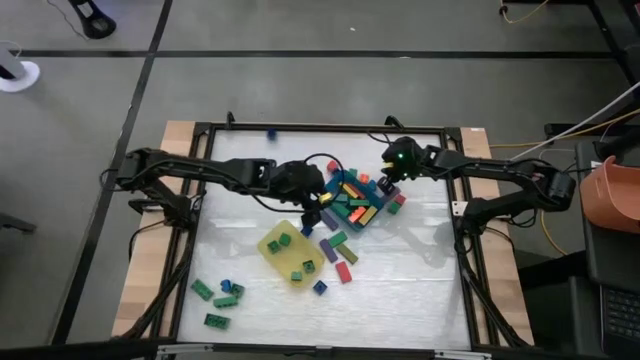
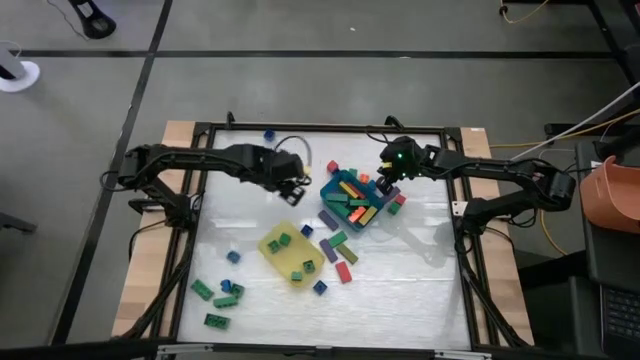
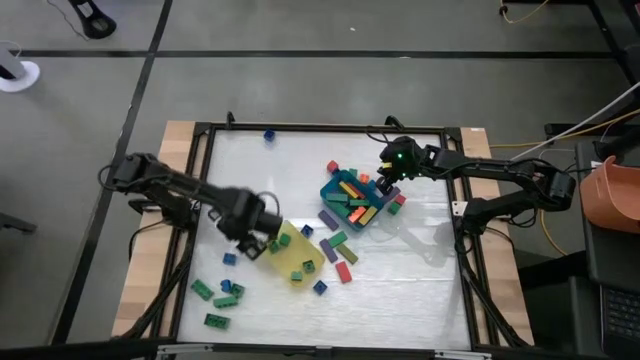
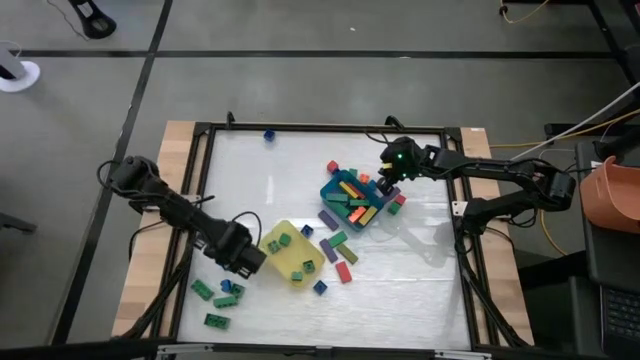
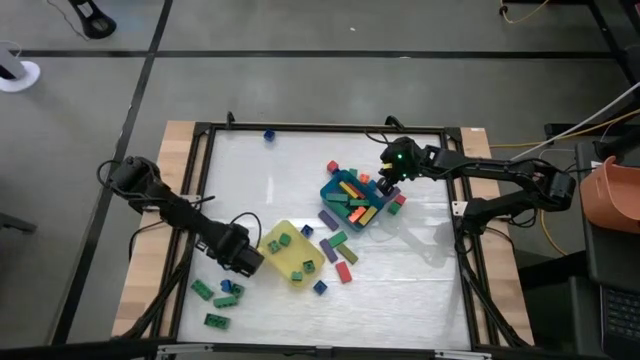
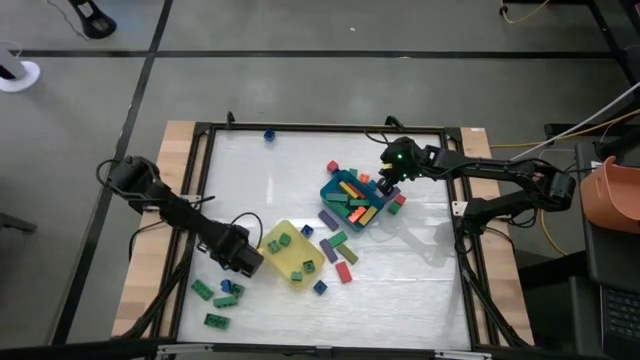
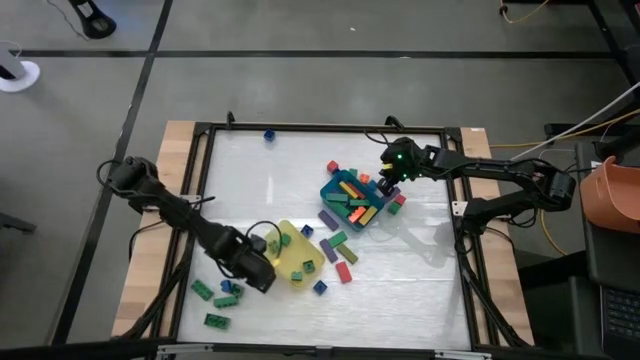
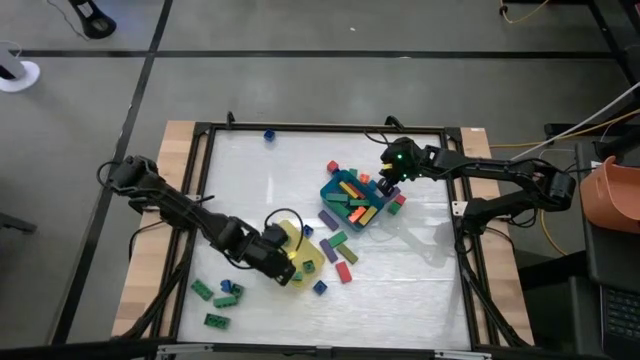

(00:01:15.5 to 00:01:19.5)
Task: Sort blocks by size
Put the small blue game piece into the yellow bin

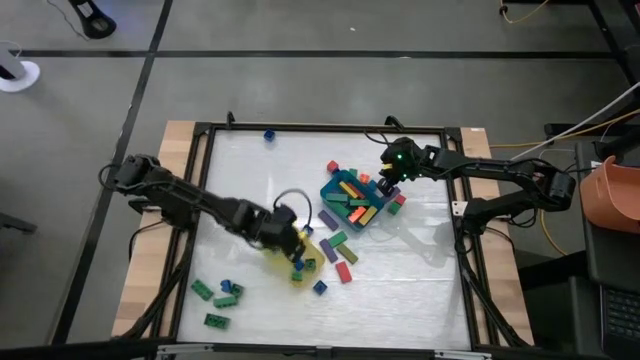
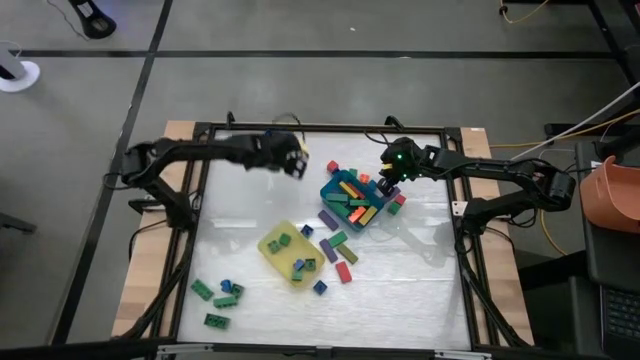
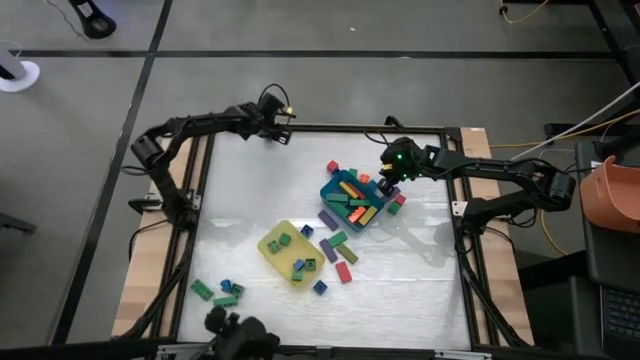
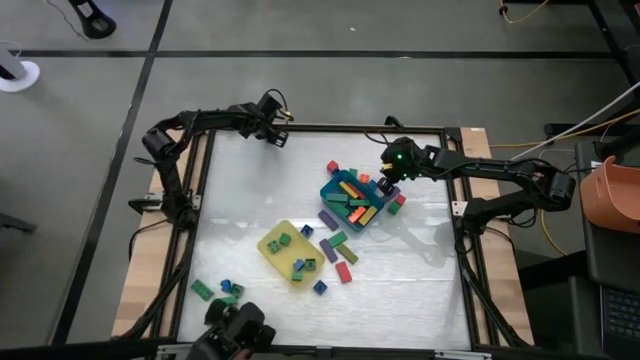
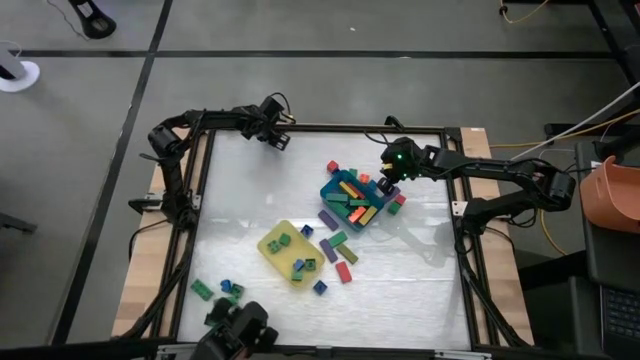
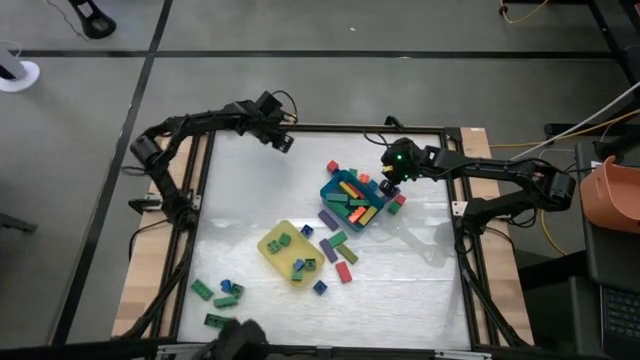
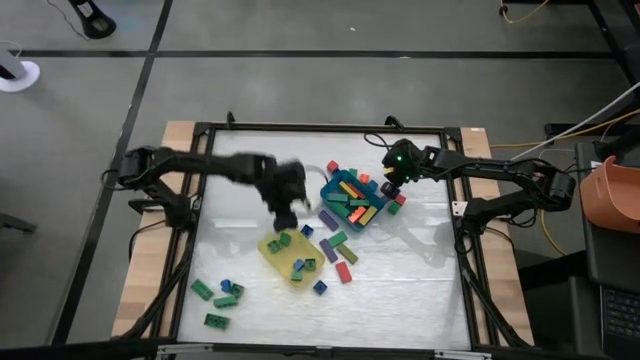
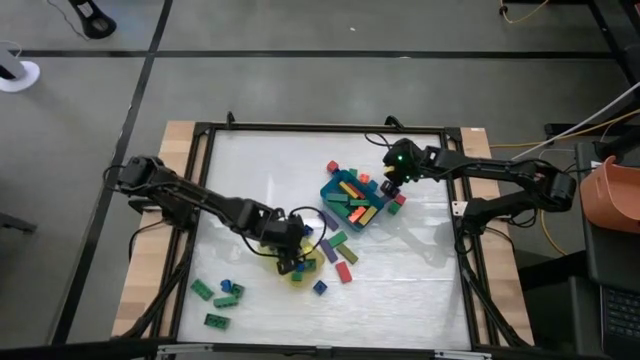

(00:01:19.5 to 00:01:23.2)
Put the small blue game piece into the yellow bin

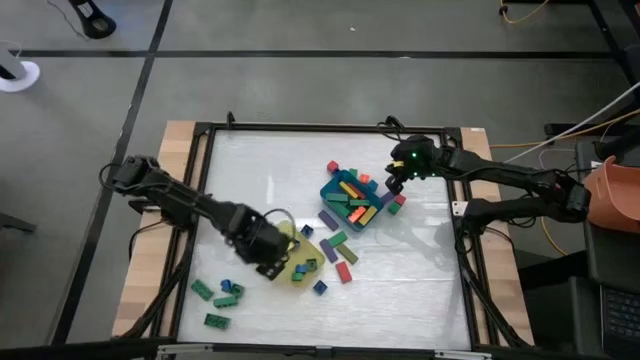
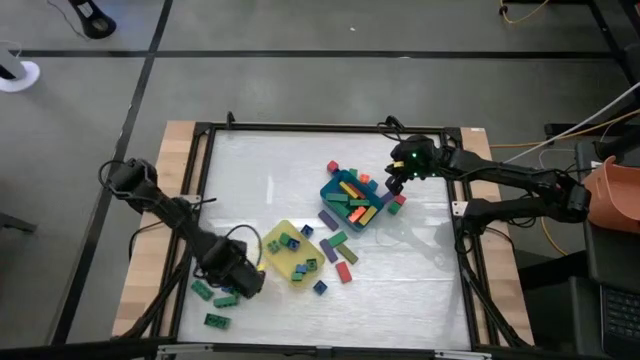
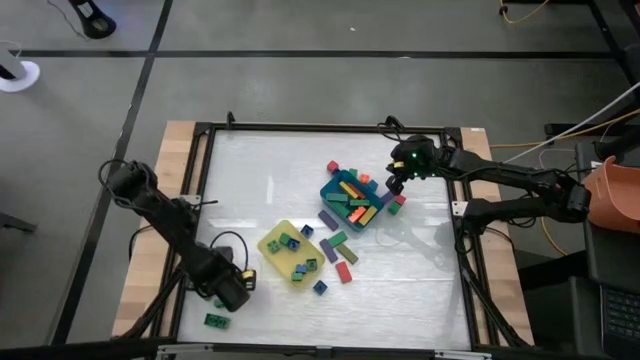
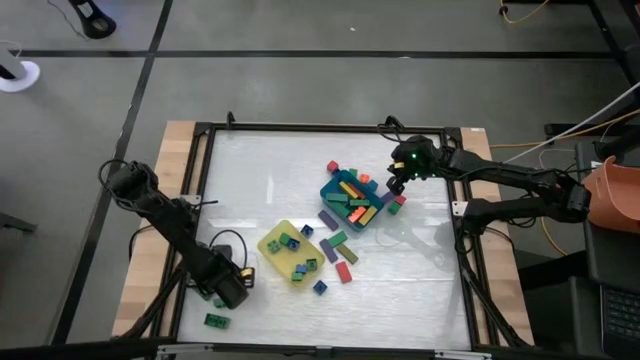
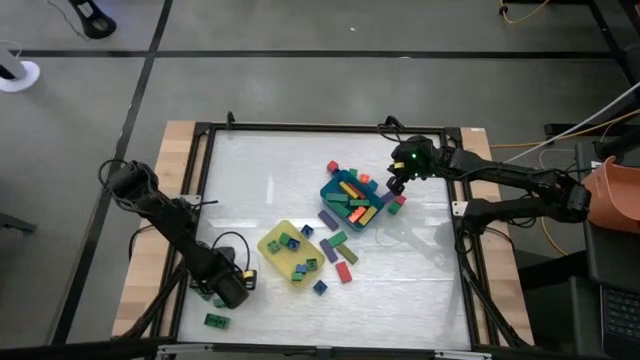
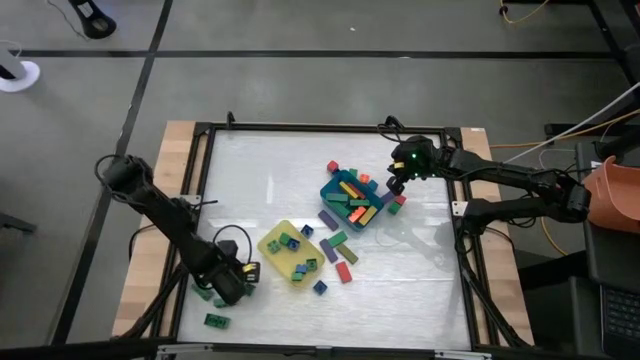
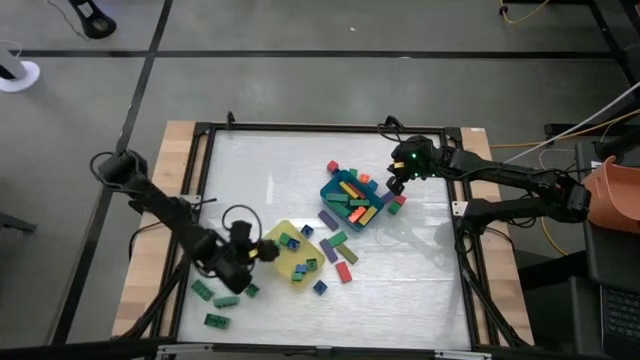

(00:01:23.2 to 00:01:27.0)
Put the small blue game piece into the yellow bin

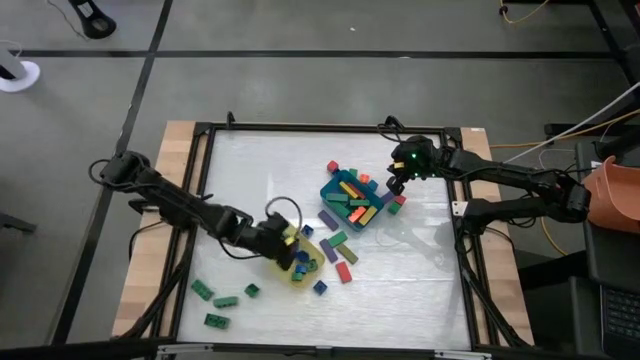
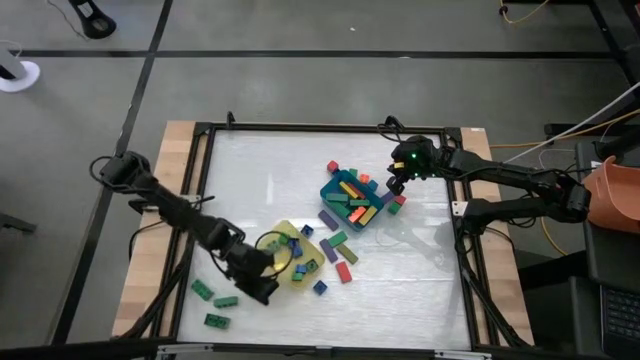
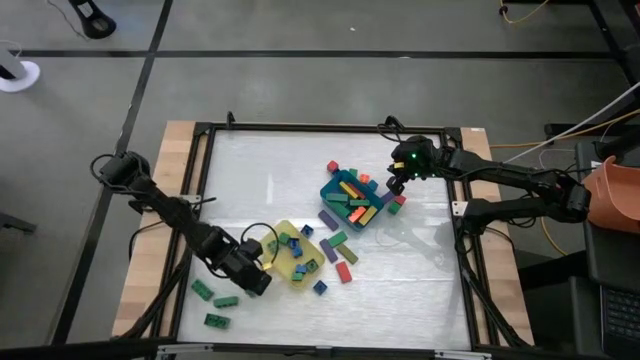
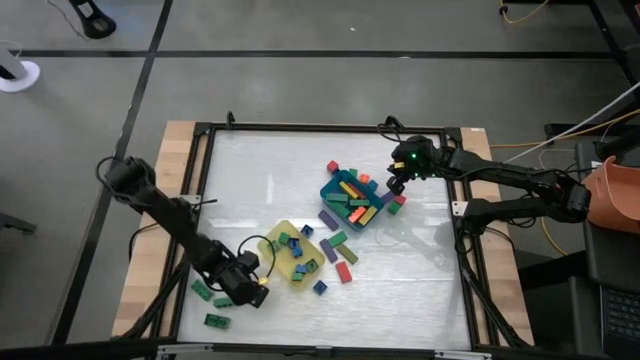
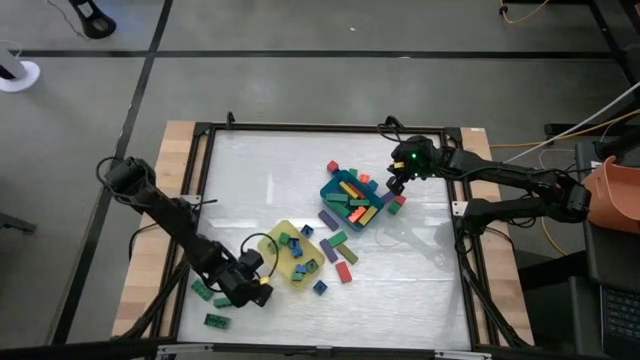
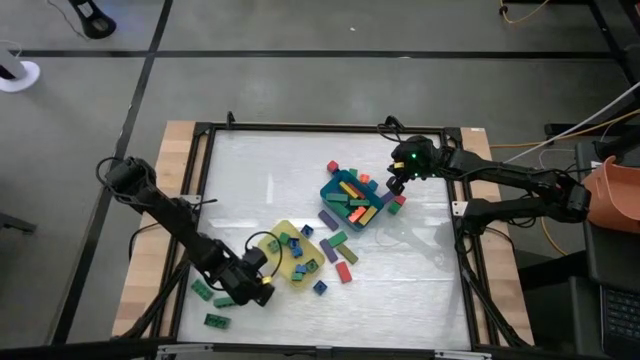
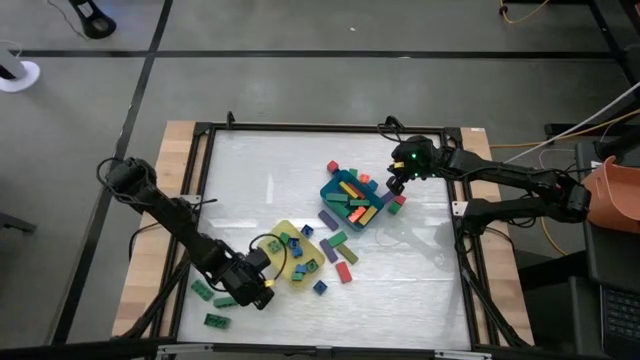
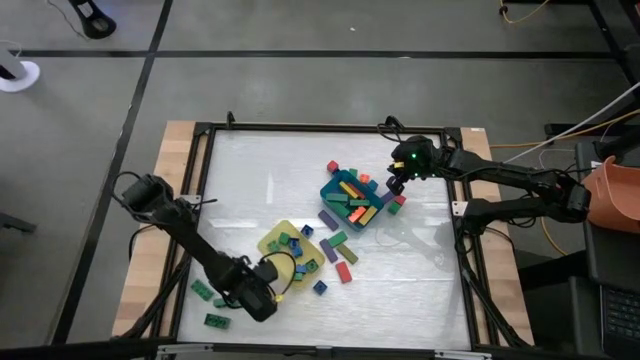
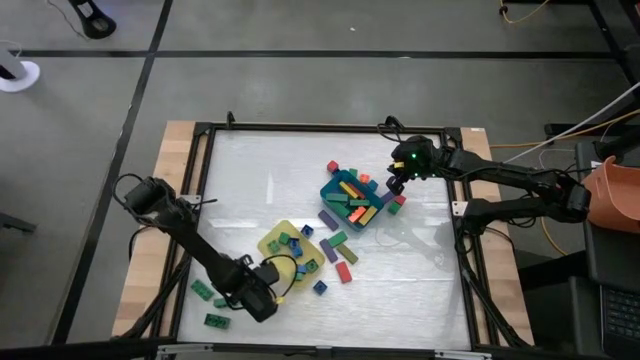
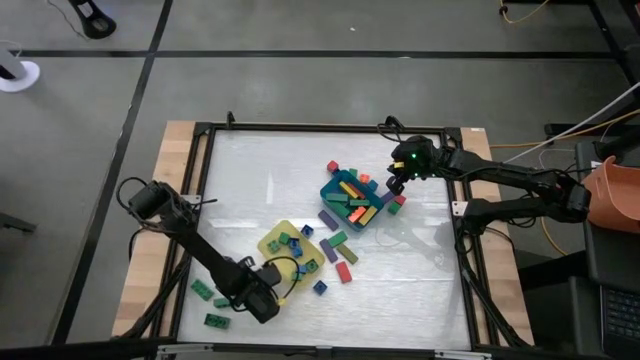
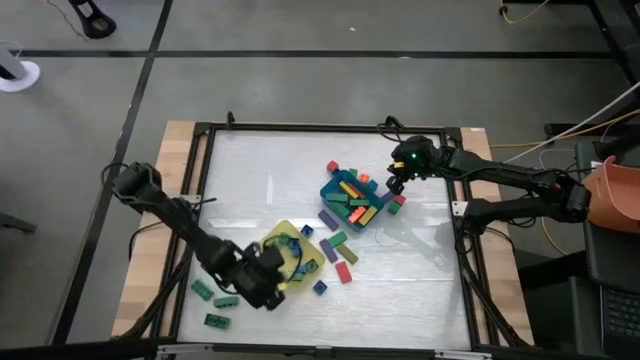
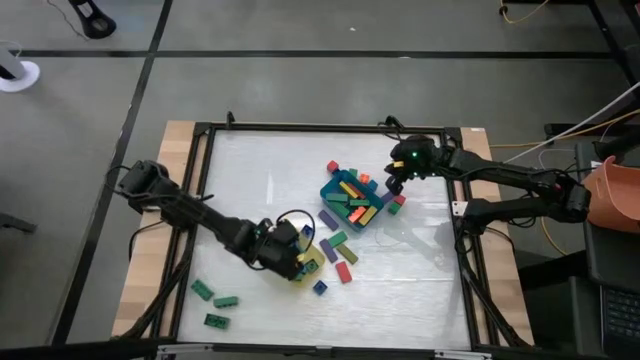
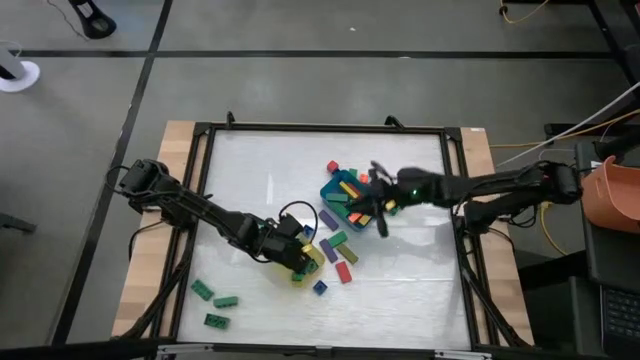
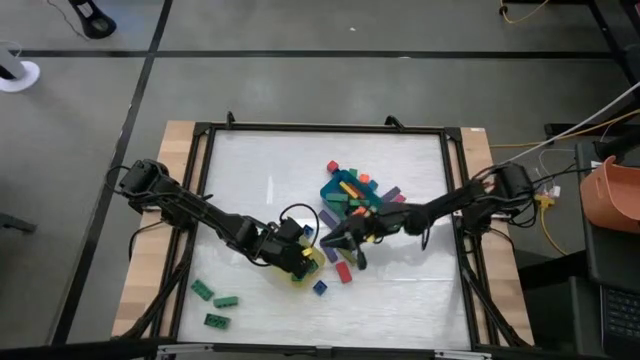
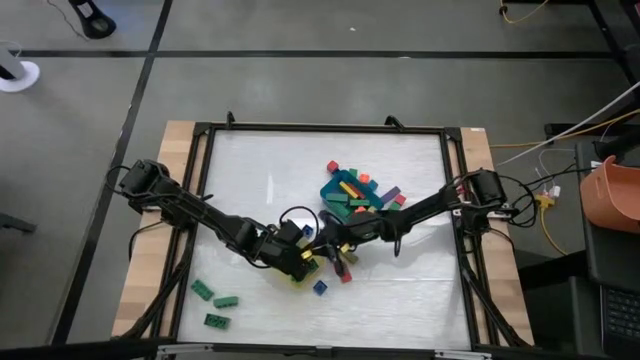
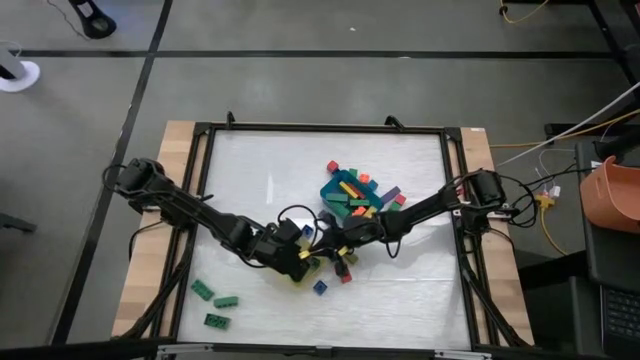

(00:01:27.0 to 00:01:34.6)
Put the small green game piece into the yellow bin
